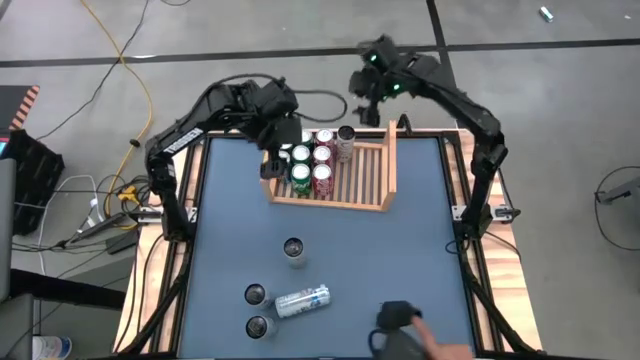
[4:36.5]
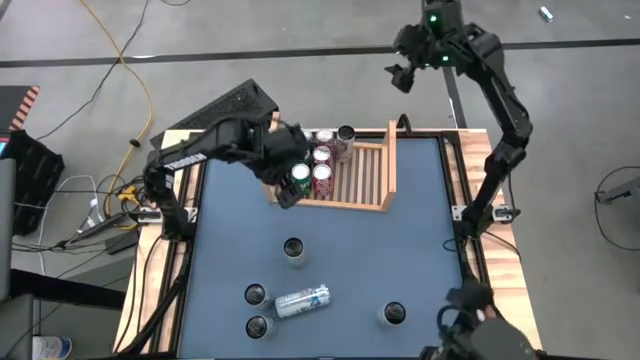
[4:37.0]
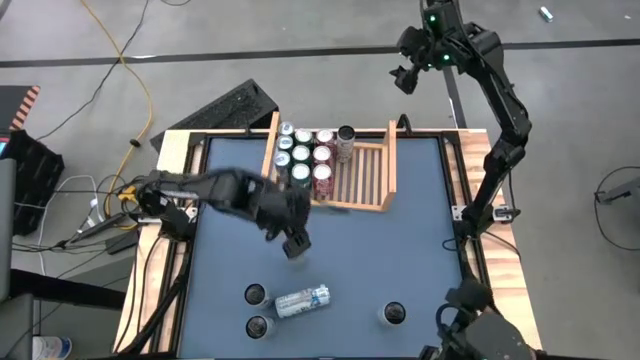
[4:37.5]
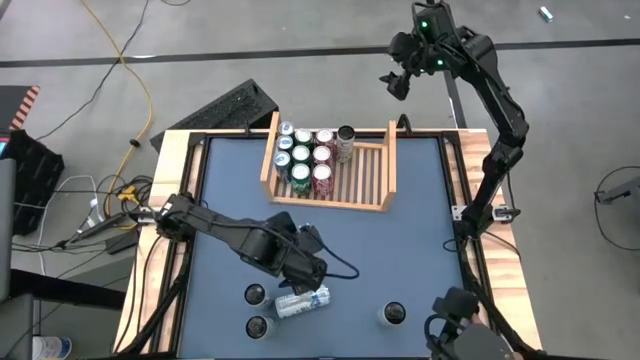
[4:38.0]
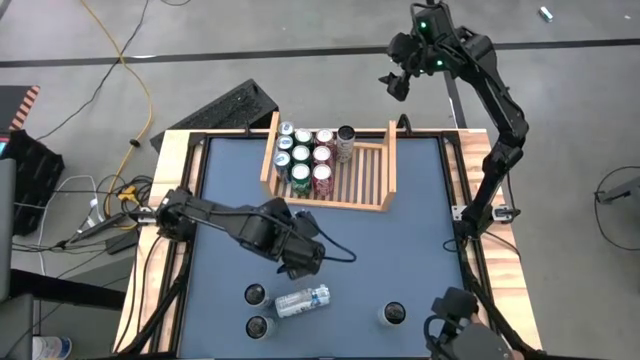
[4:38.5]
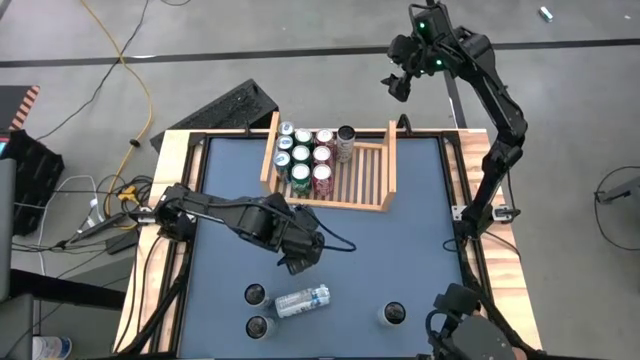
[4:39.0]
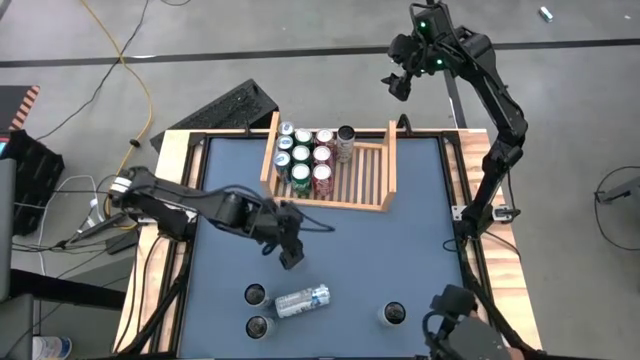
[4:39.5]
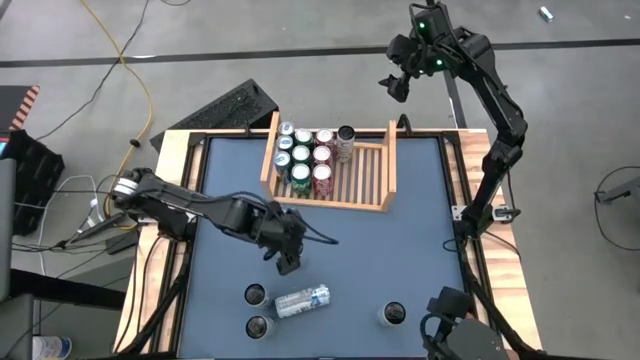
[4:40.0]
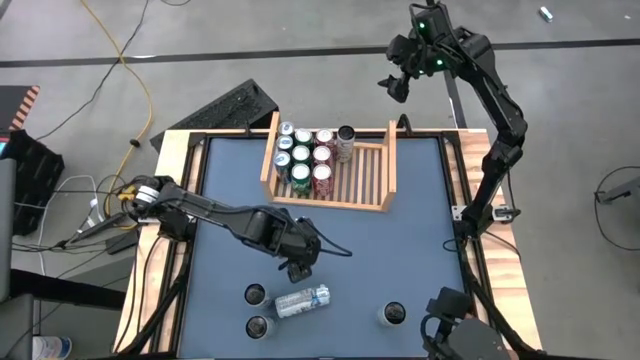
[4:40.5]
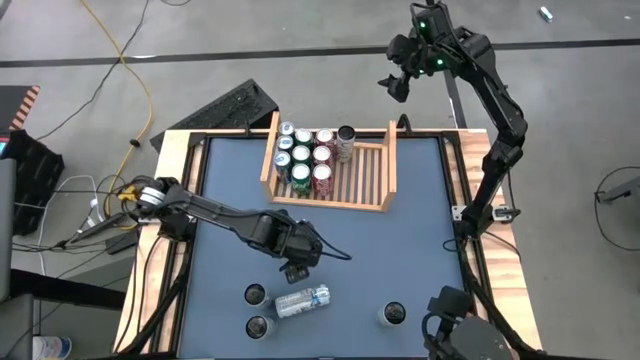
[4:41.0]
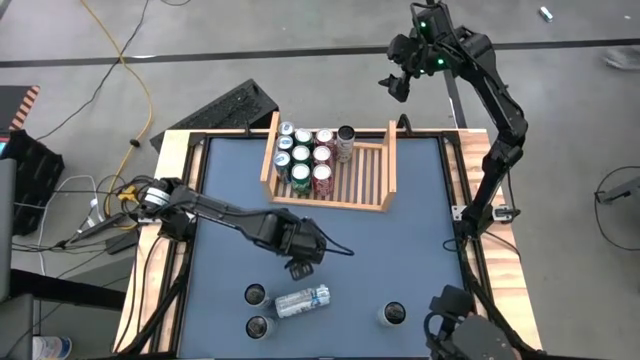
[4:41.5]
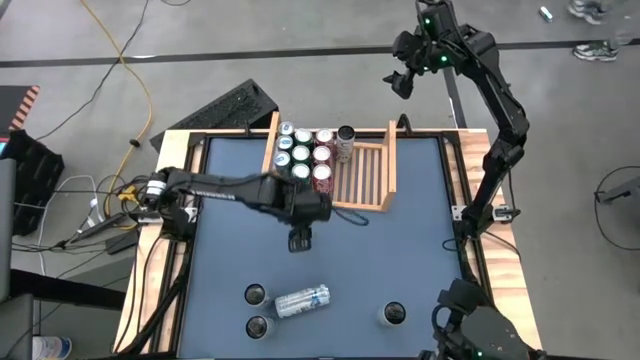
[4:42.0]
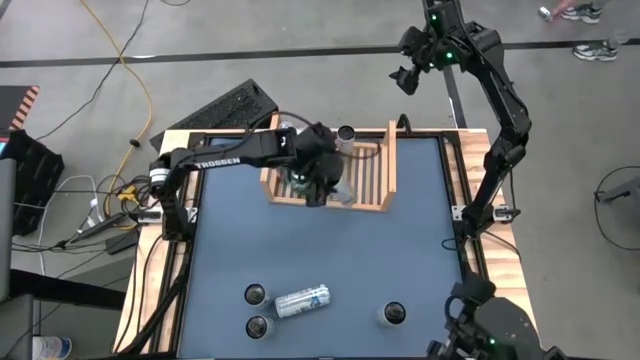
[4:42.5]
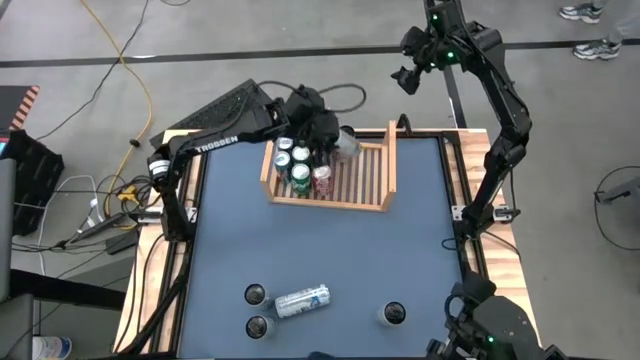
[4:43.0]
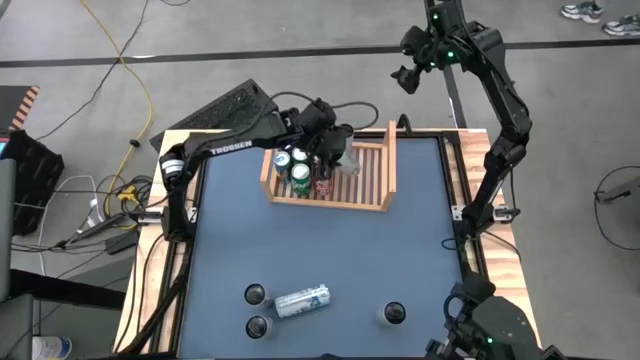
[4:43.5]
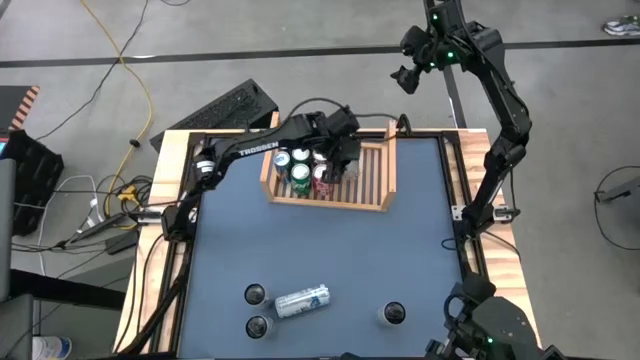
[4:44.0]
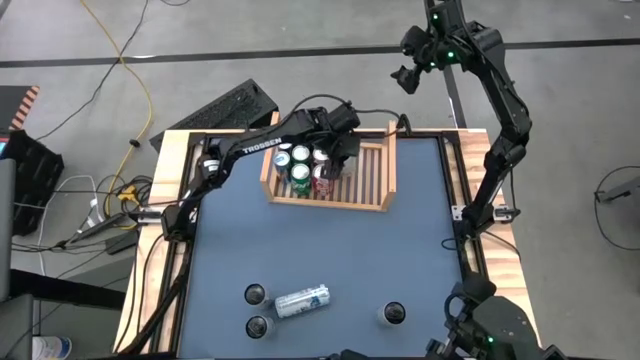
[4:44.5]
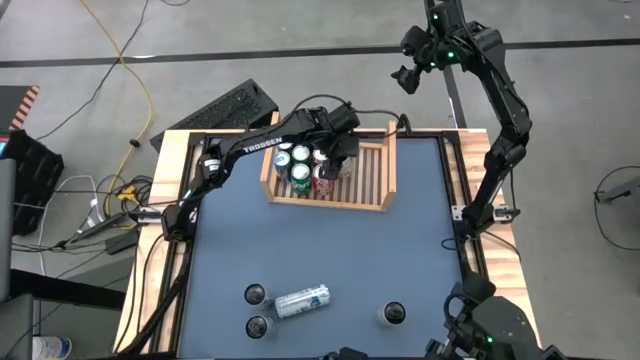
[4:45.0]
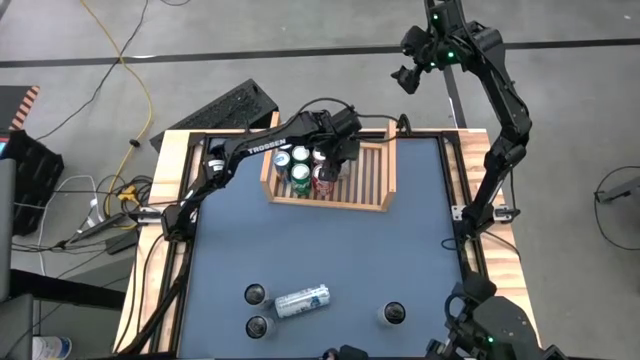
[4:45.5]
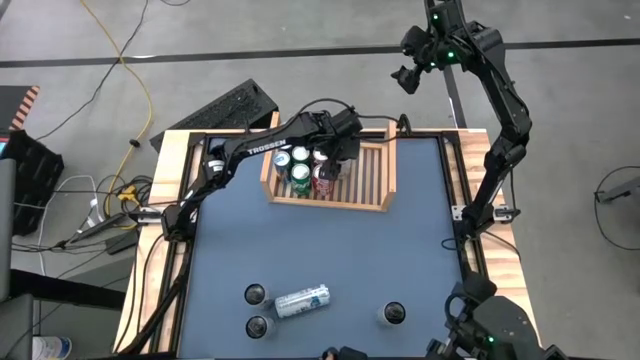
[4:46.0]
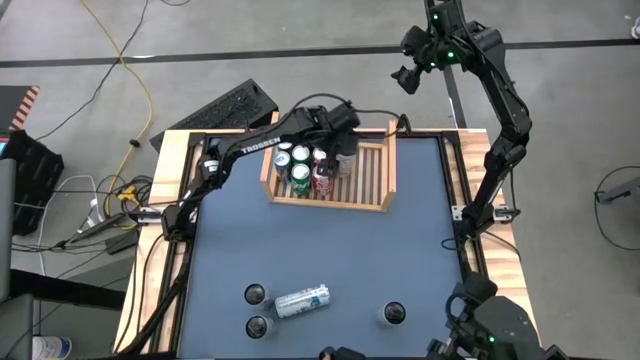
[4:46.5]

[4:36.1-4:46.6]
Task: Place canned beverage on shelf
Put the light yellow soda can on the shelf

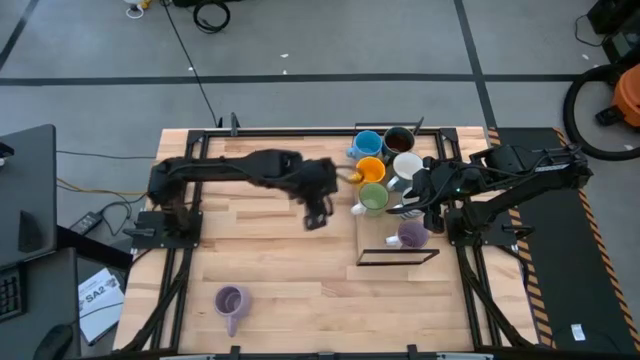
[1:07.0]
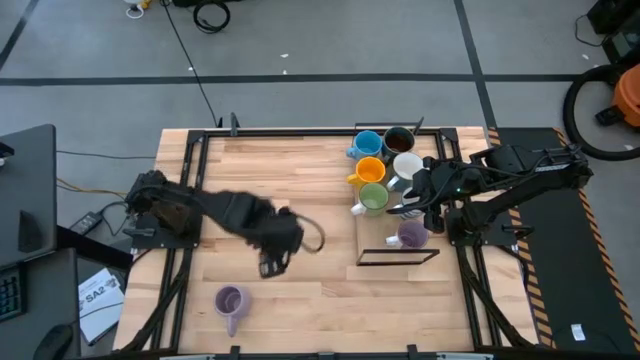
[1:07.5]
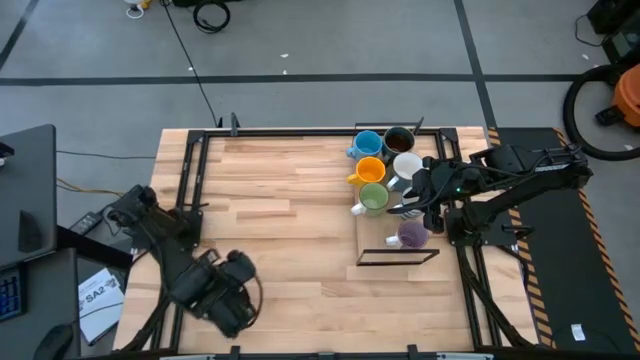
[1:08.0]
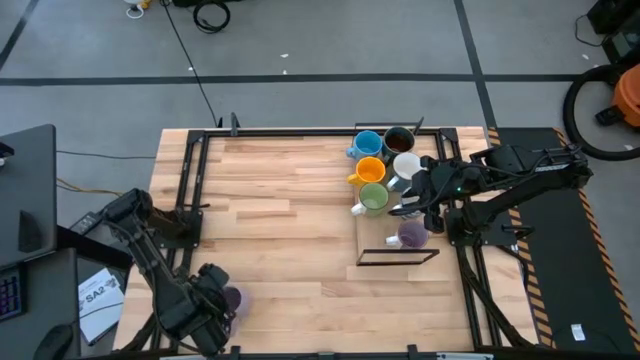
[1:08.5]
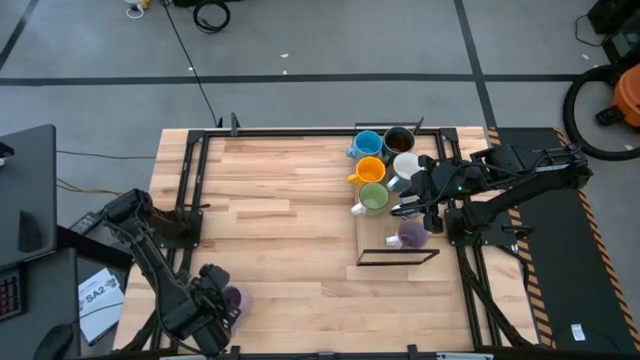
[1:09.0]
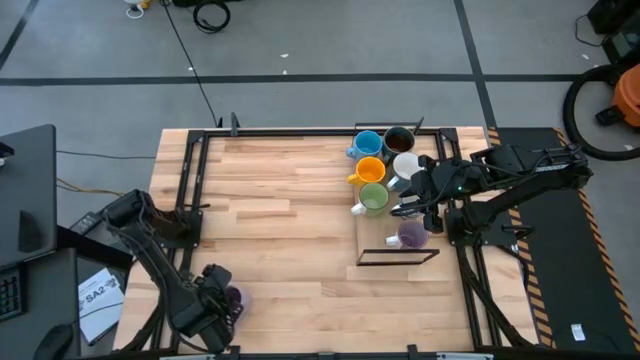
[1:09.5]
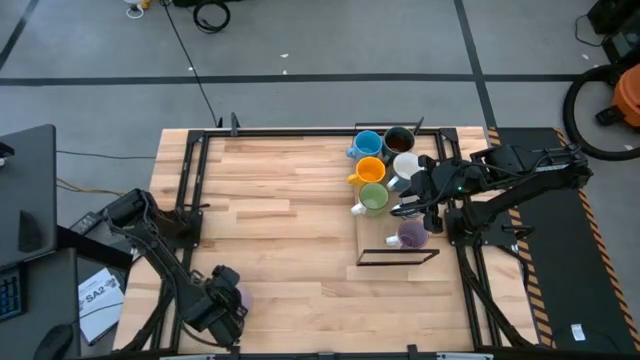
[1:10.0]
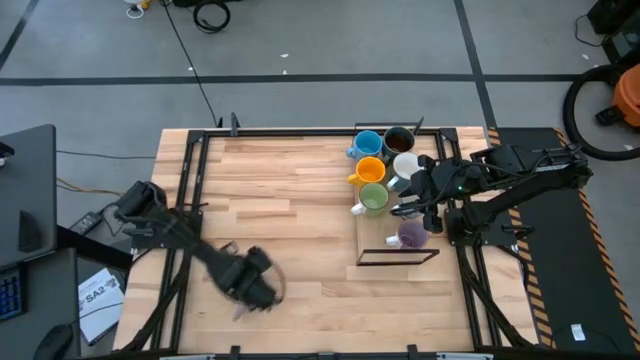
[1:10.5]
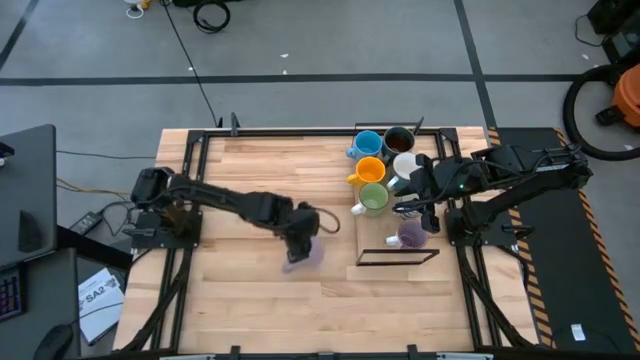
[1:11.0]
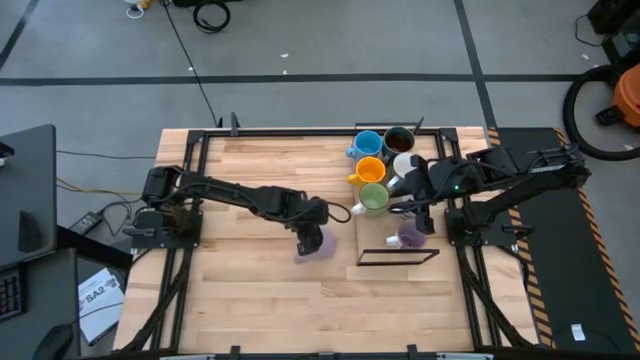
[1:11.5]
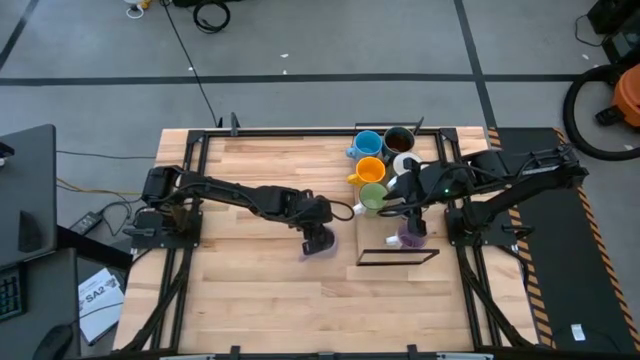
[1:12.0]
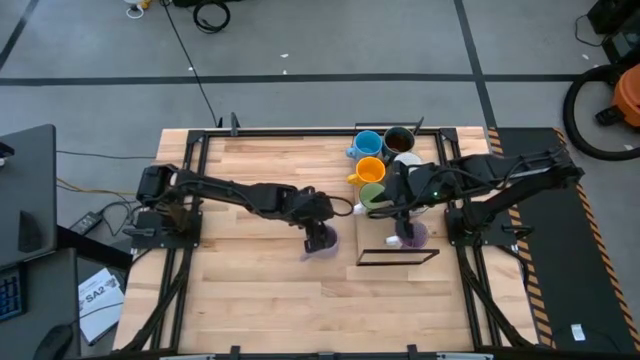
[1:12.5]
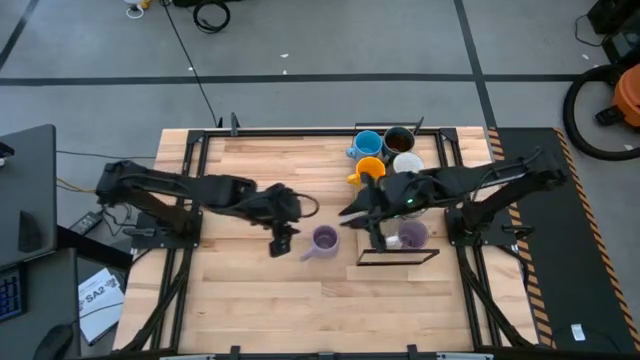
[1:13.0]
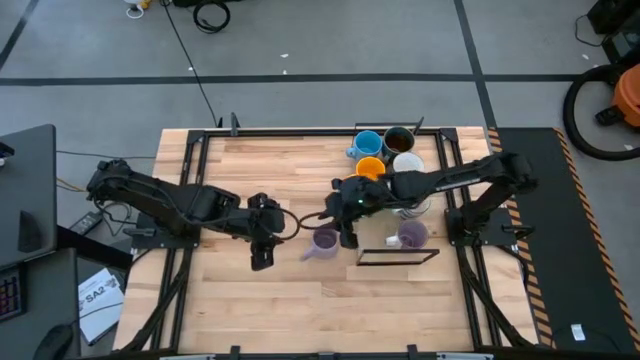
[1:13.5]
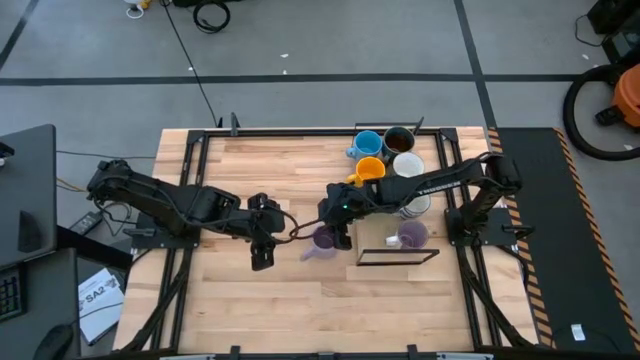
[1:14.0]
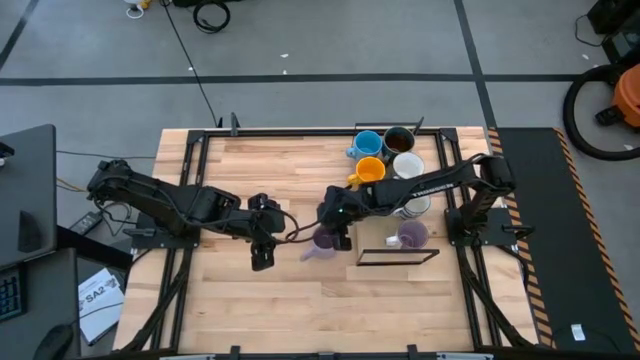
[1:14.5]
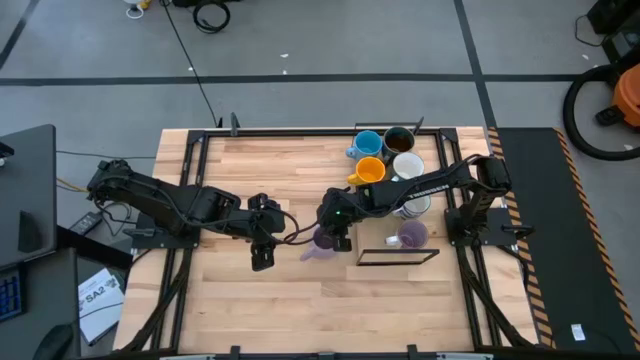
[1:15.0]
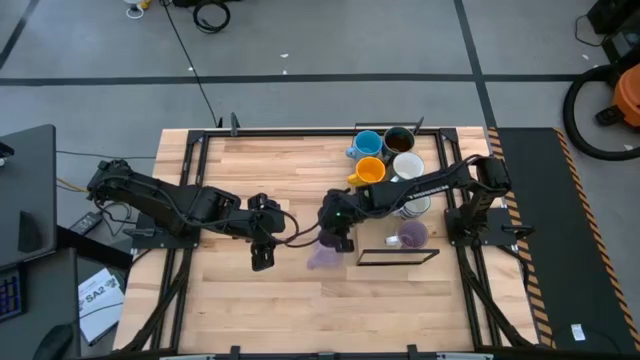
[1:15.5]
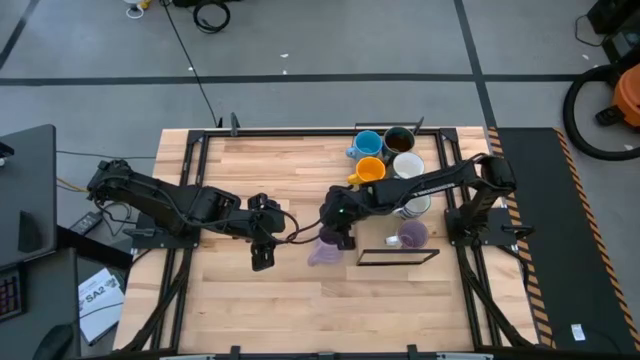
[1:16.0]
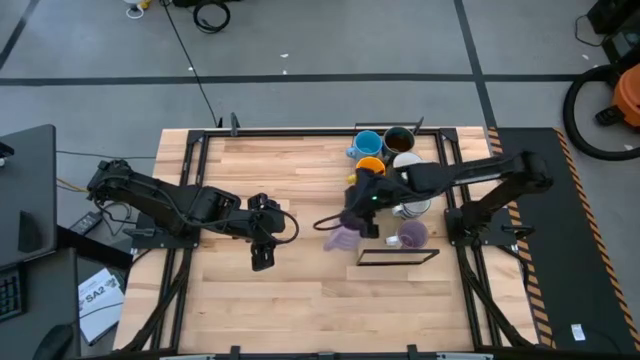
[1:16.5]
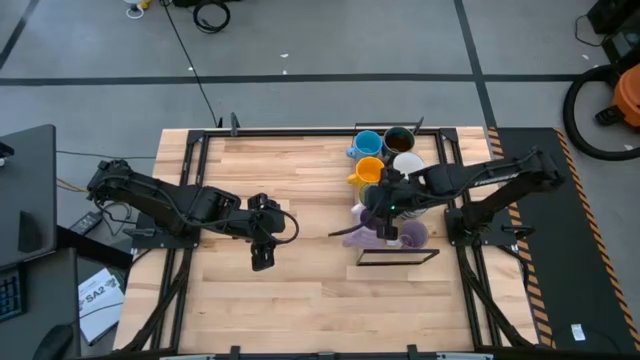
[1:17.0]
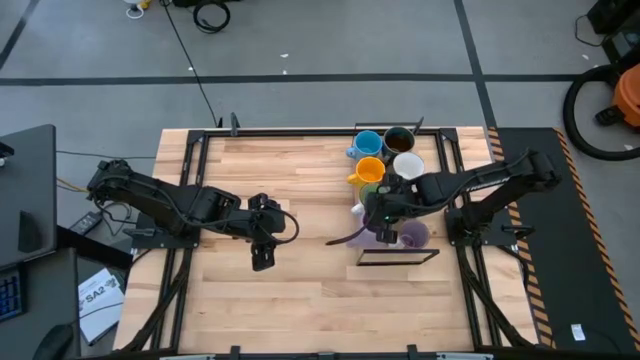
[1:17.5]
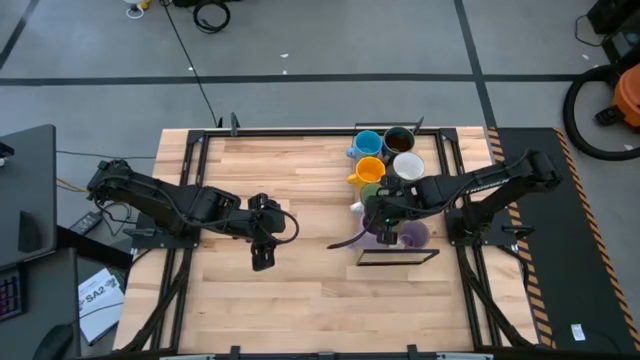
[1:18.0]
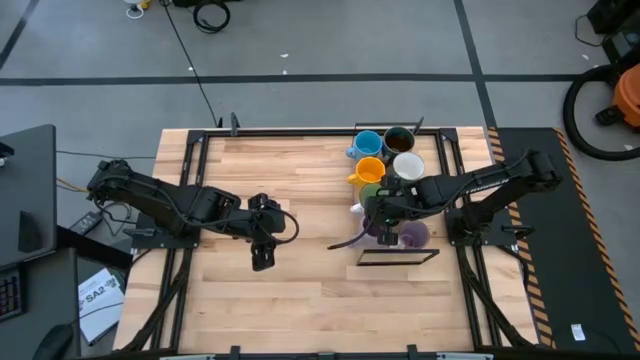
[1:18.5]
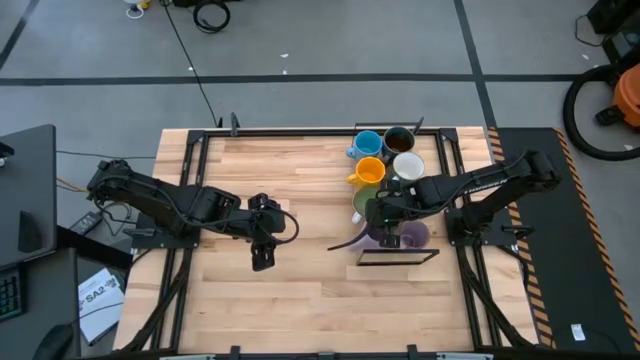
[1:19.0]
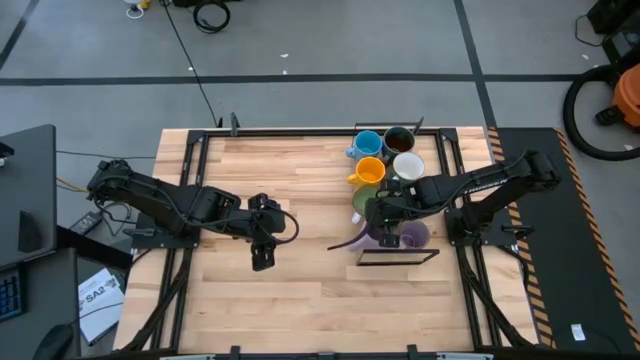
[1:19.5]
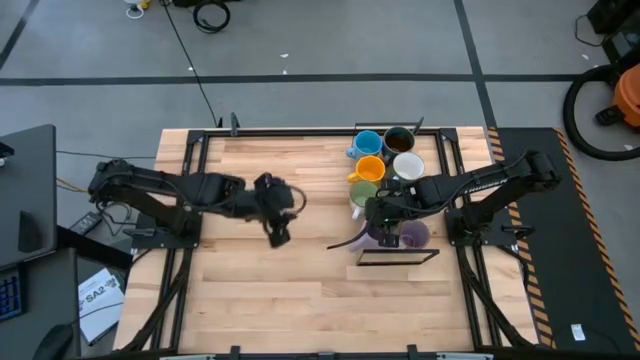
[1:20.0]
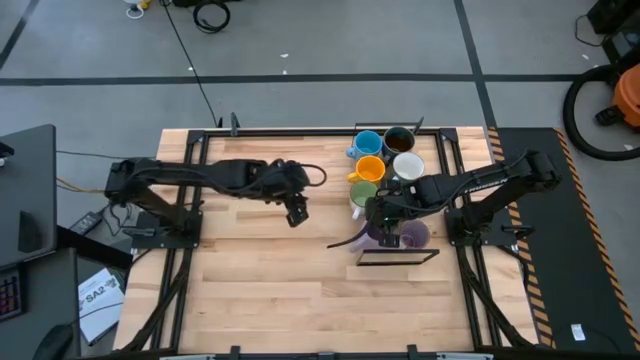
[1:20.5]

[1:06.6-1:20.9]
Task: Place coffee mugs
Put the purple mug on the shelf
